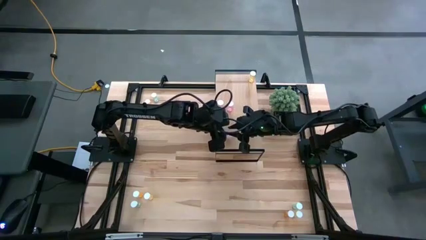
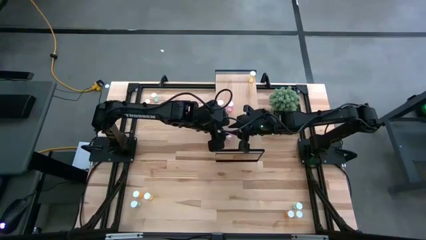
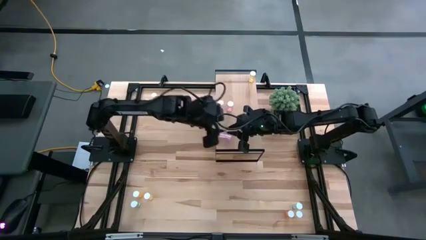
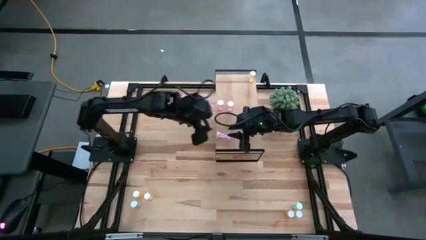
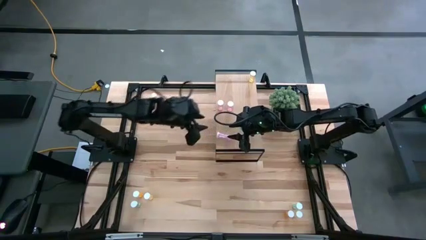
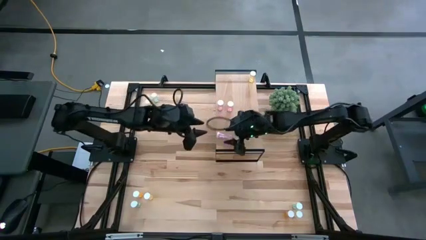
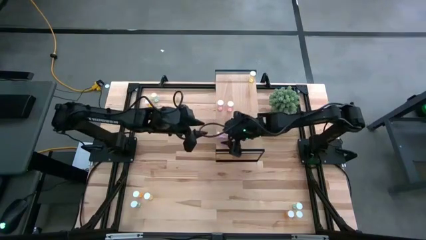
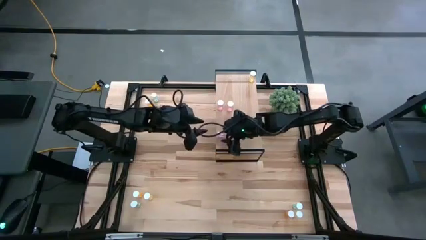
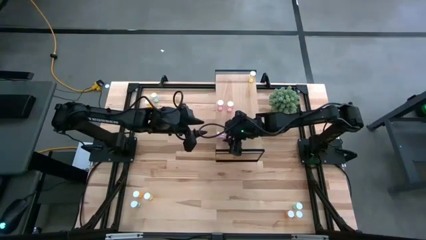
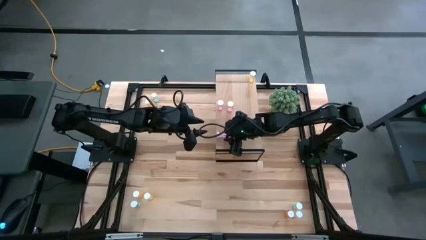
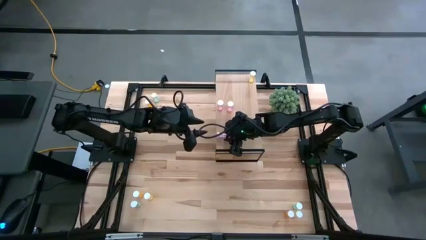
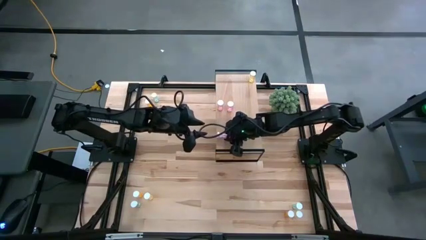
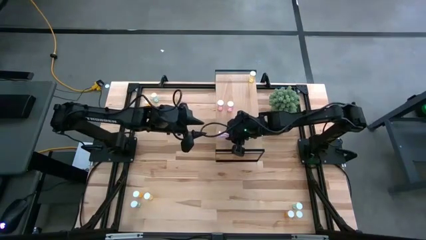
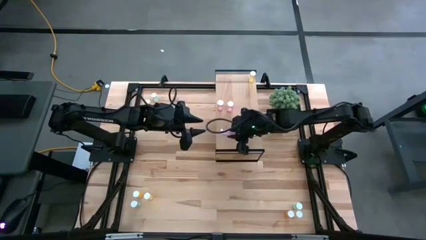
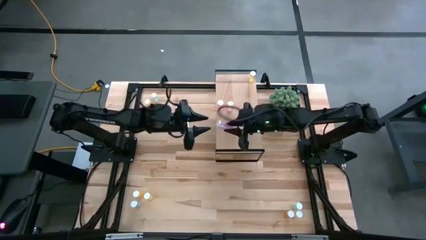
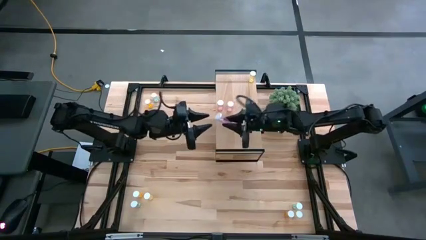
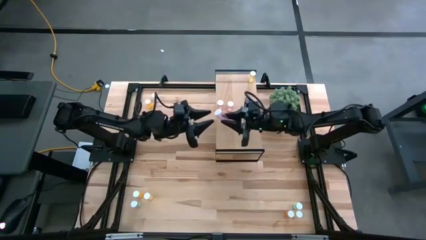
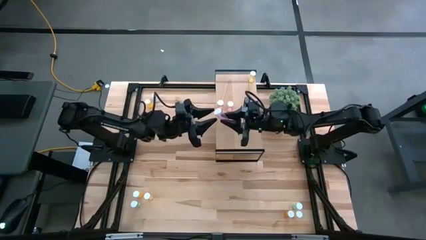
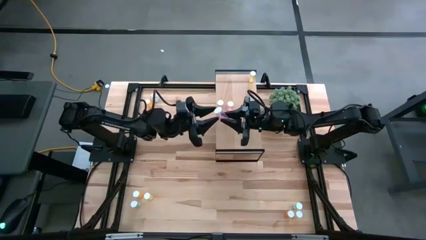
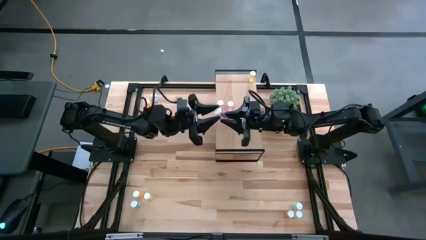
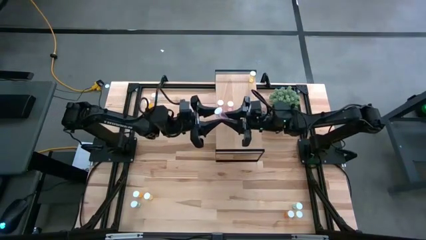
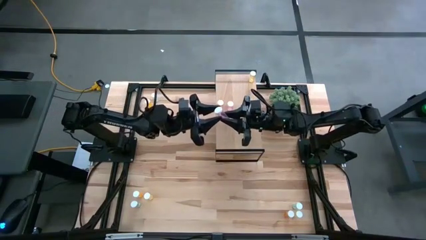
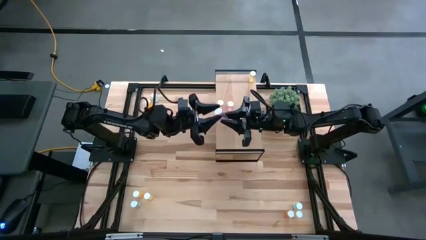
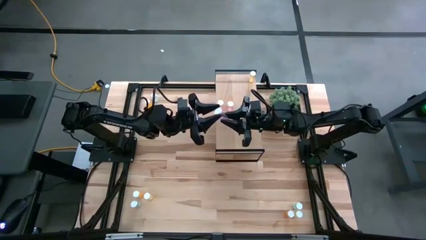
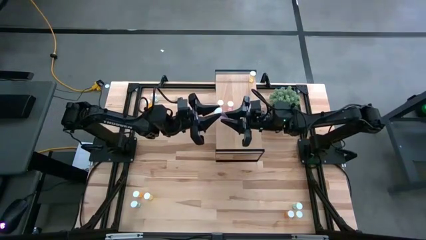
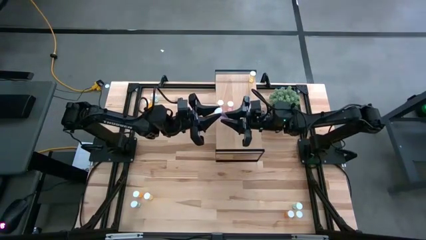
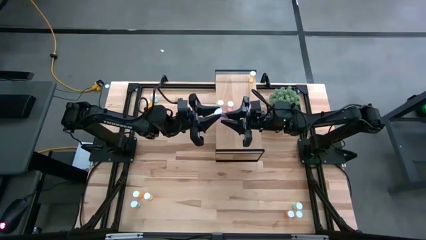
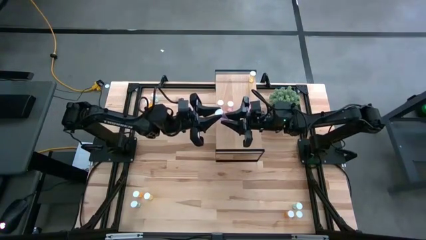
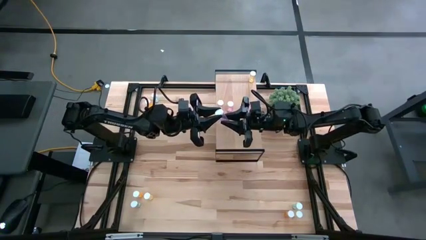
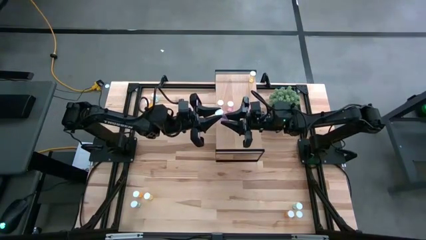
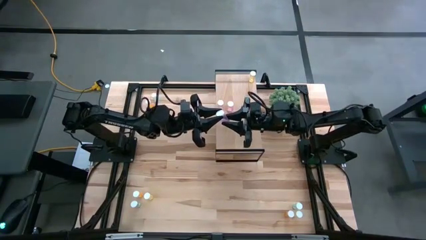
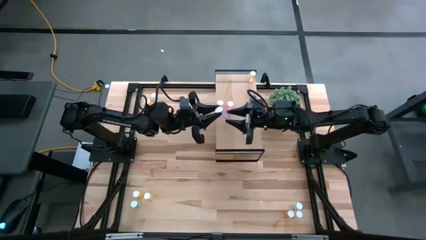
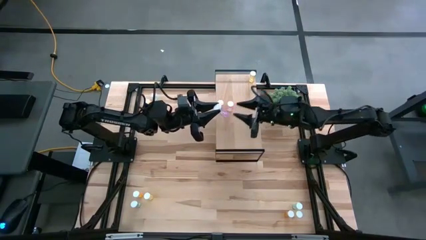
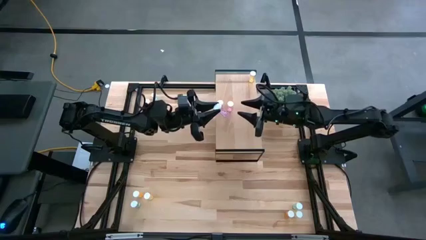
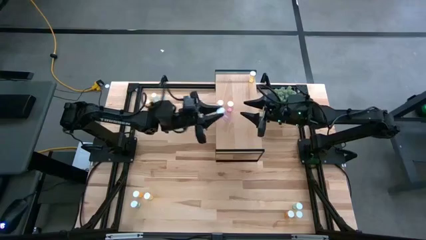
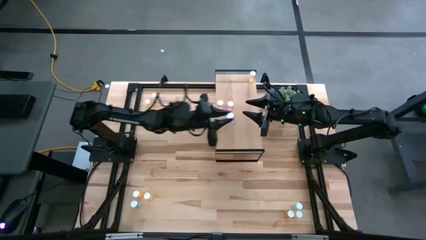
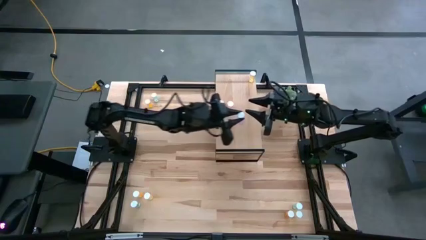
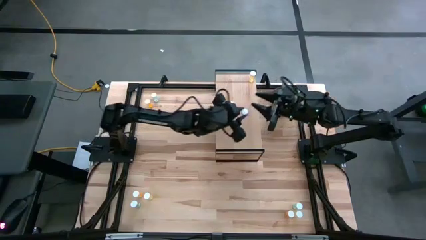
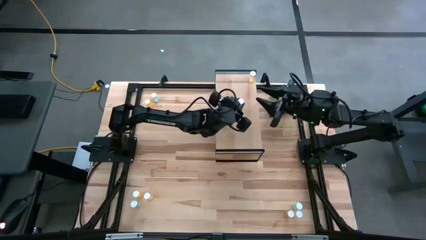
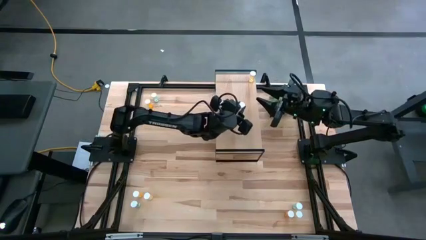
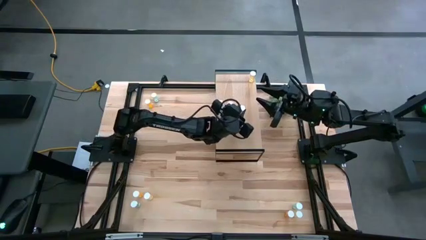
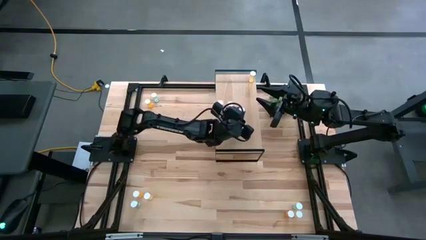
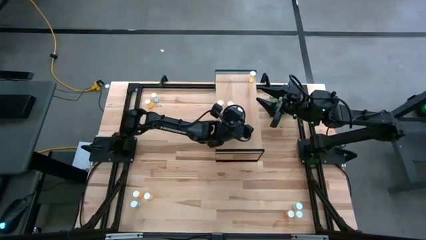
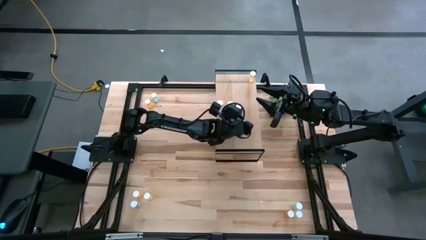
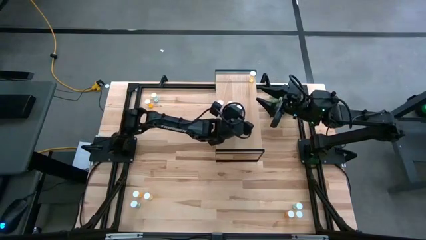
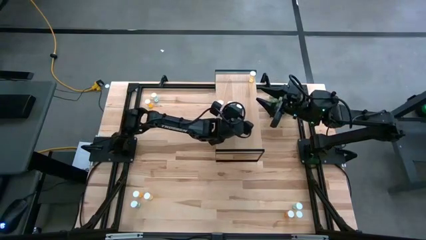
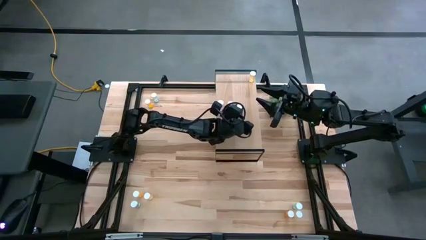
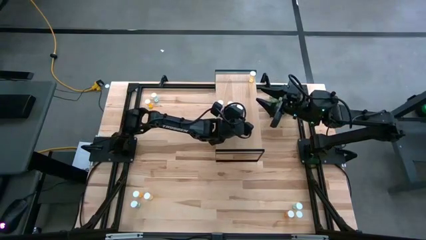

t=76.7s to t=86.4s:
Task: Pick and place medicine bottles onto shelf by color
Put the pink pill bottle on the shelf aligned with the other pink pill bottles

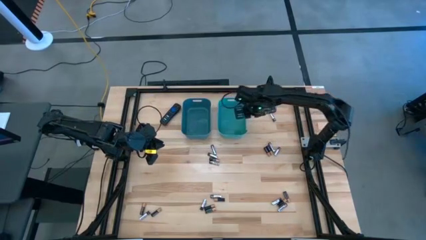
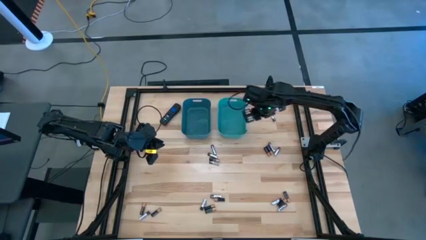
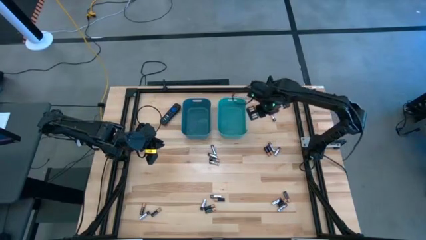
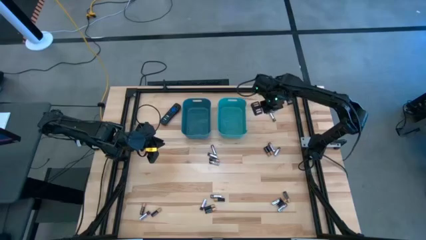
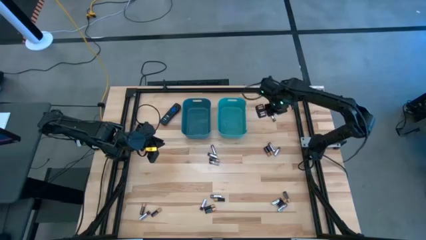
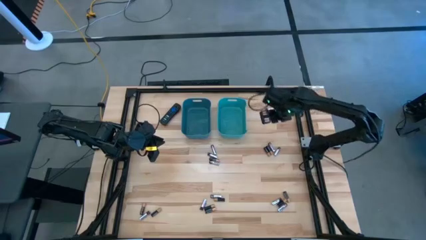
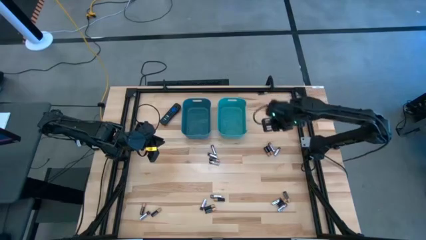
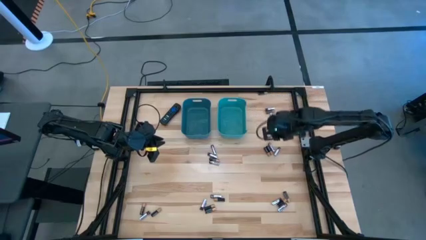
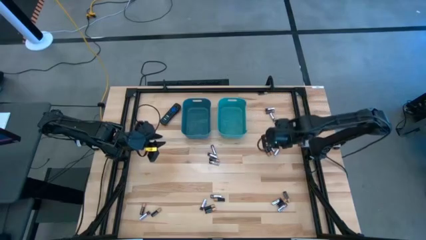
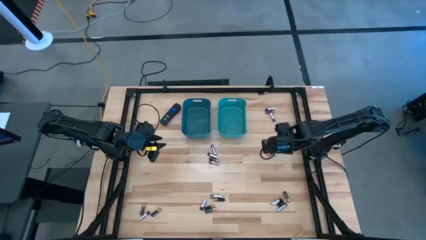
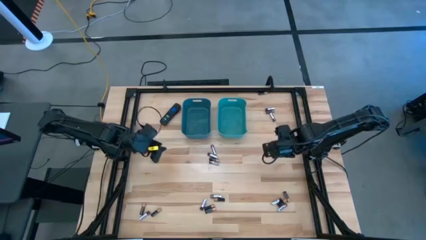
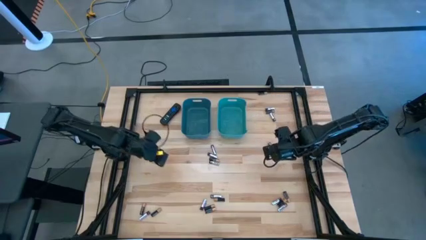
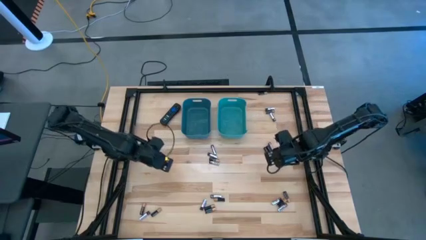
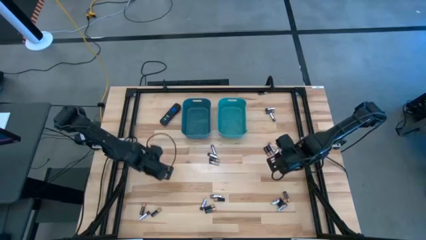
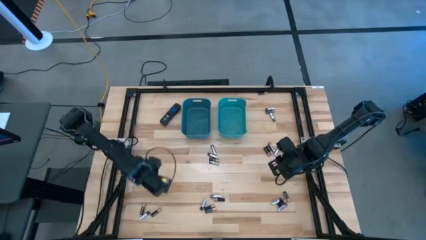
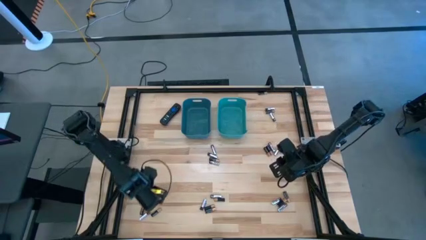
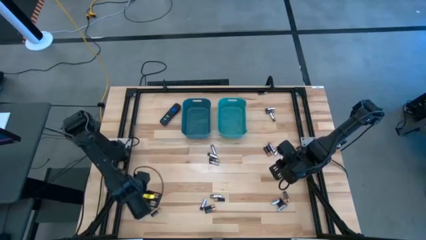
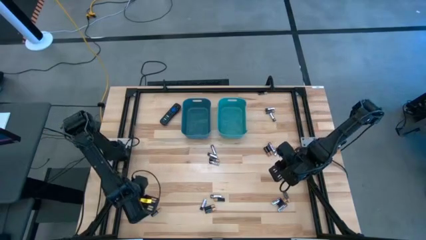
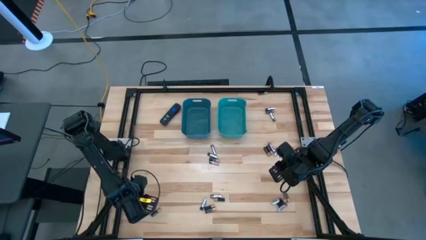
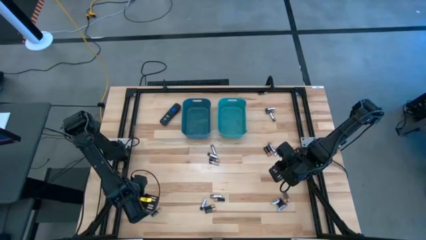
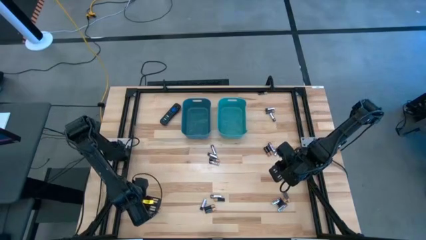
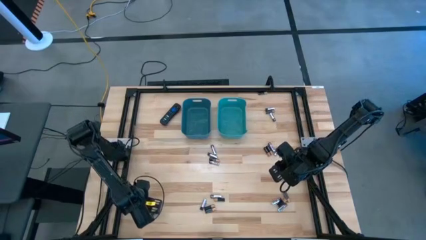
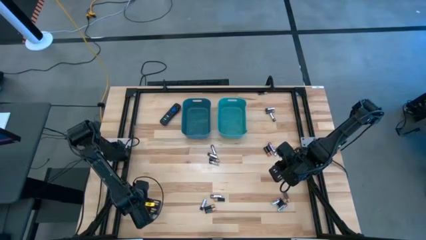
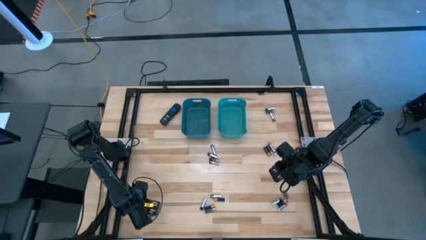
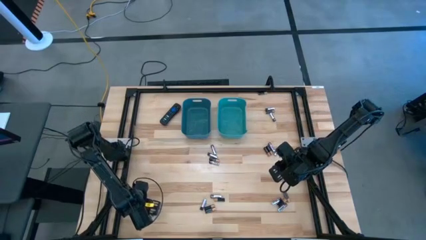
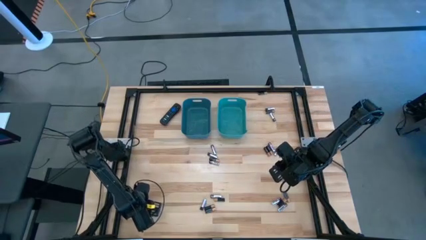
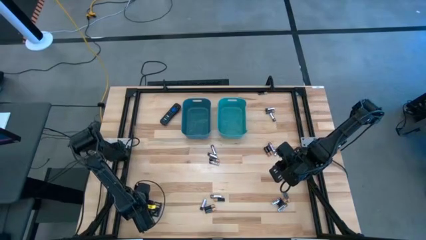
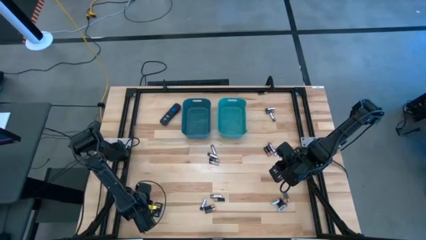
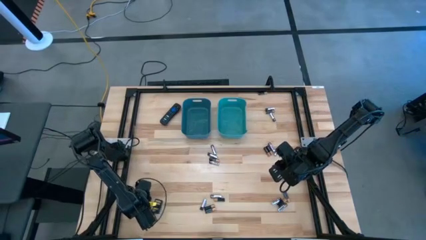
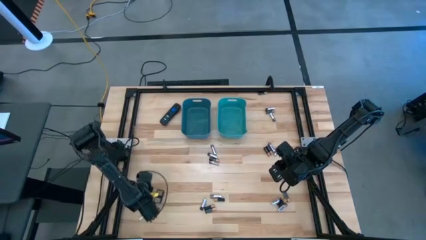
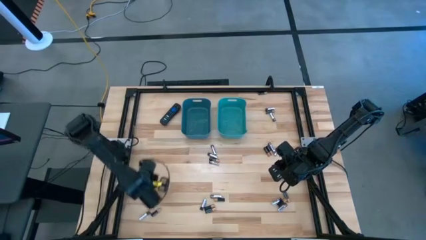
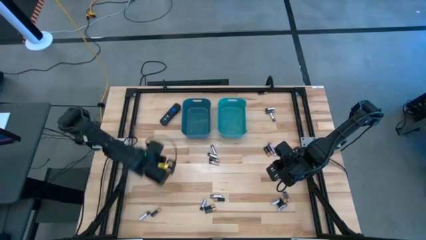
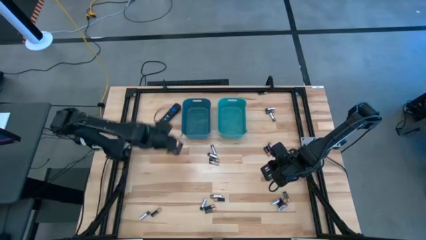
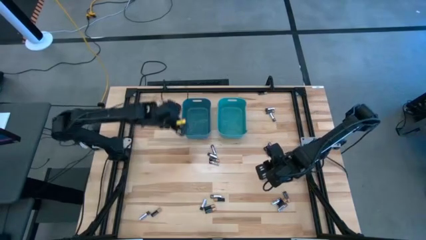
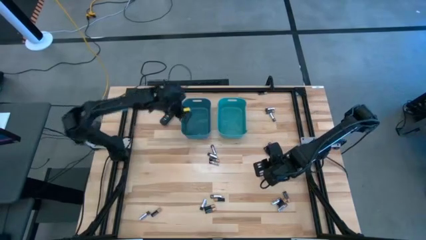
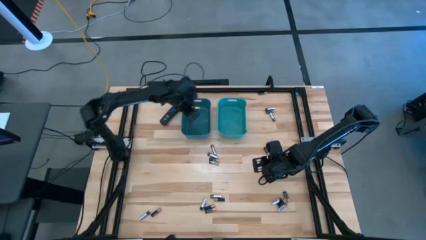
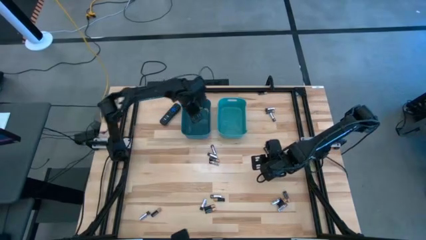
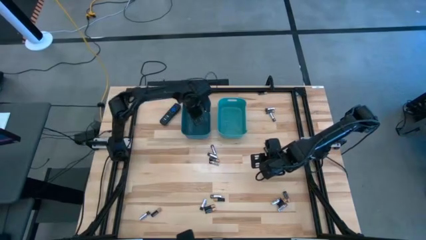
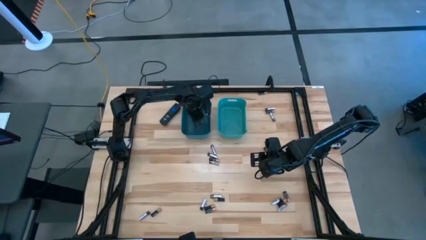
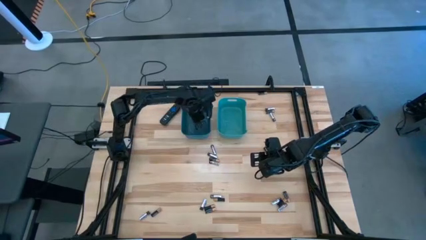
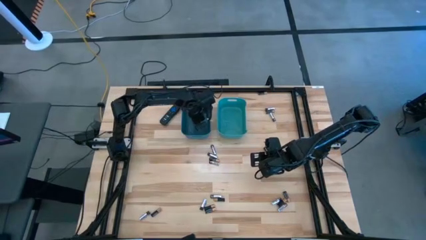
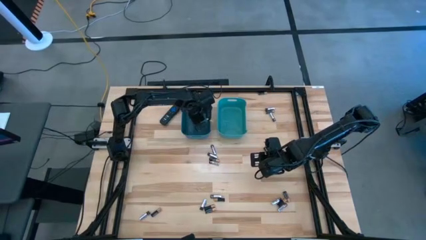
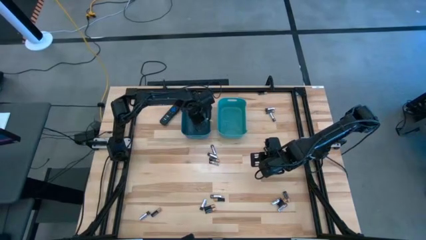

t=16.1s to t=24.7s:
Task: Sort batteries
Put the black battery into the blue bin
